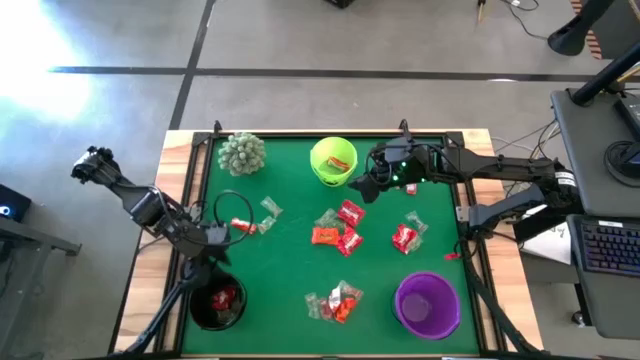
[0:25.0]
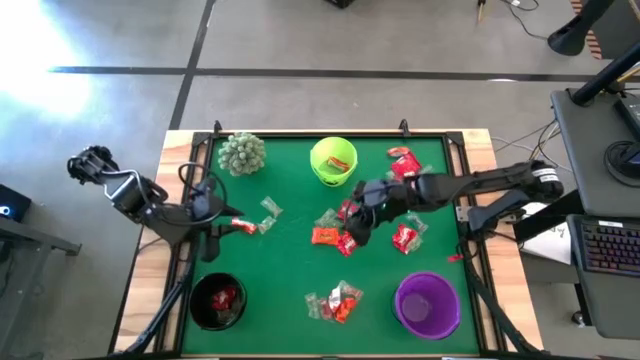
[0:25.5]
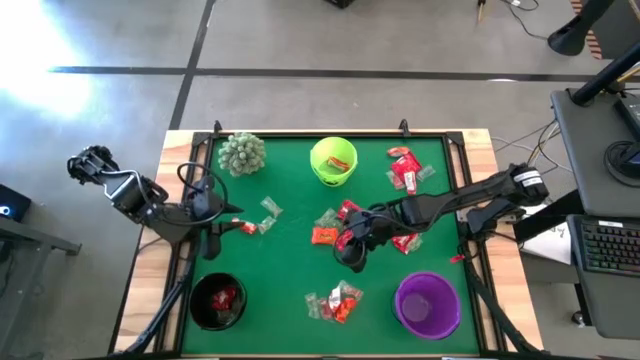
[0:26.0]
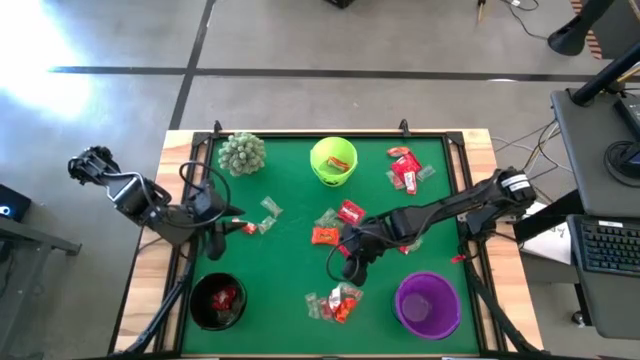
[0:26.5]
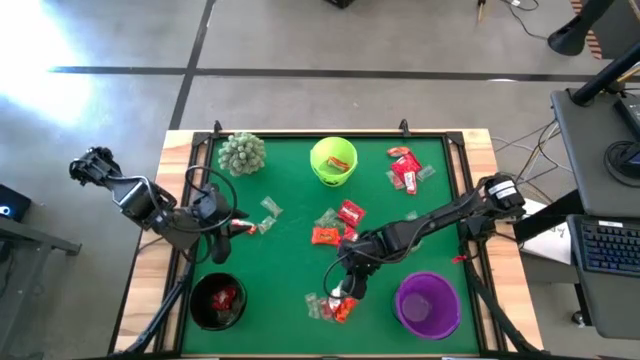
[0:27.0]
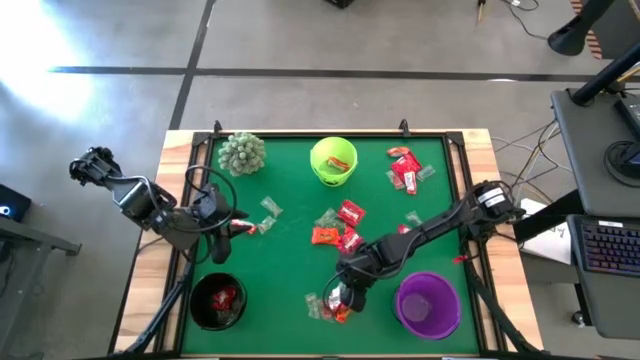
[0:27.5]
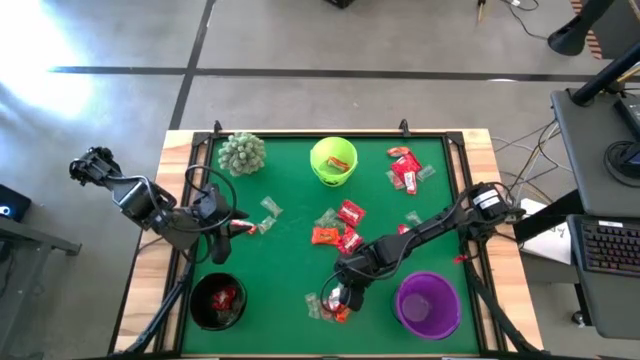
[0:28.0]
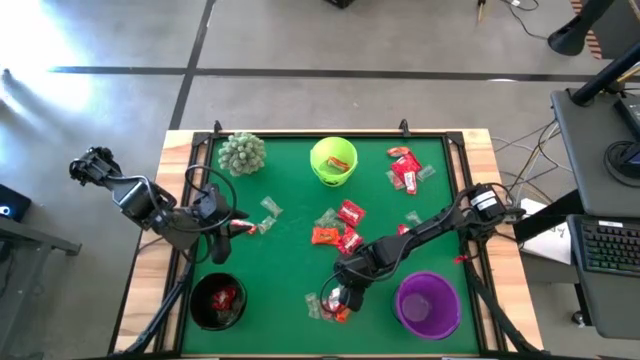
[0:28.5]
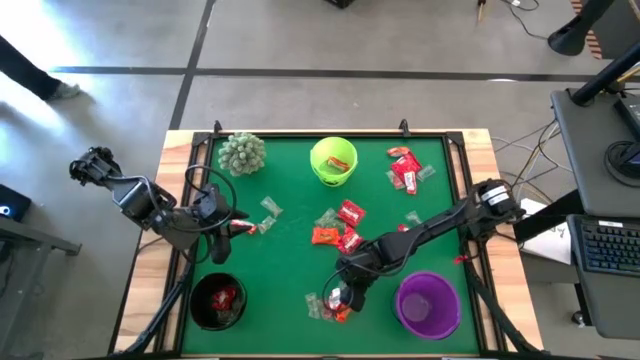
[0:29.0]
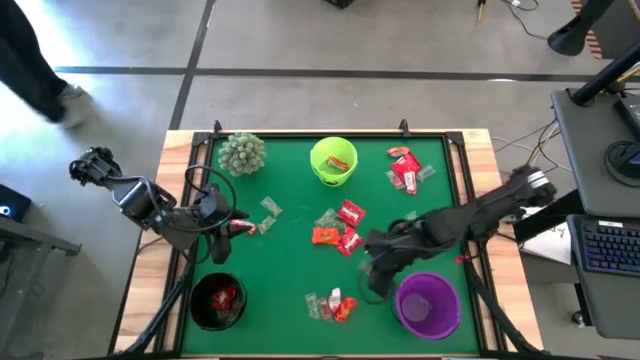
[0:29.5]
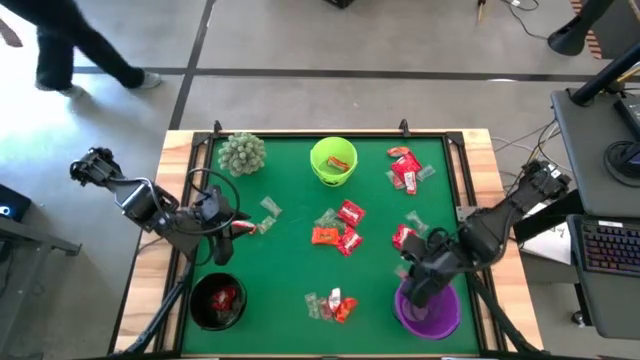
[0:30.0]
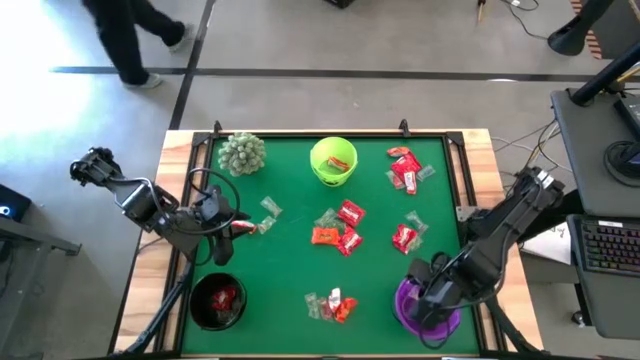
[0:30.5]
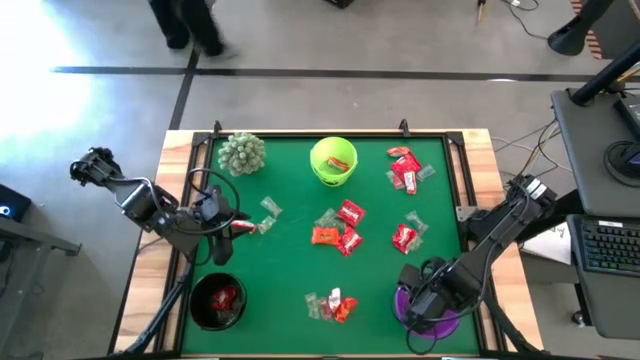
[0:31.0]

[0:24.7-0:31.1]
Task: Organize candy in baskets
Put the orange candy into the violet bucket

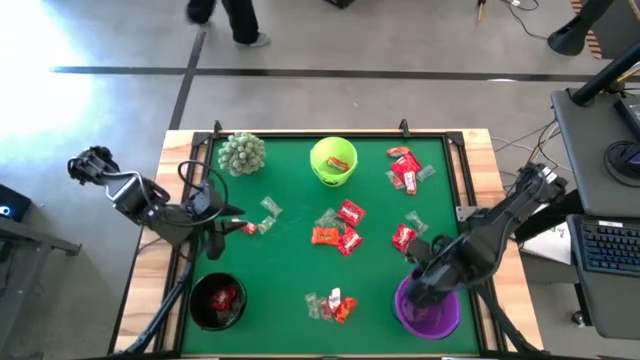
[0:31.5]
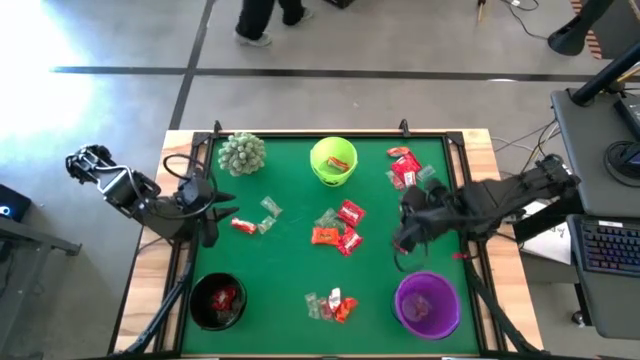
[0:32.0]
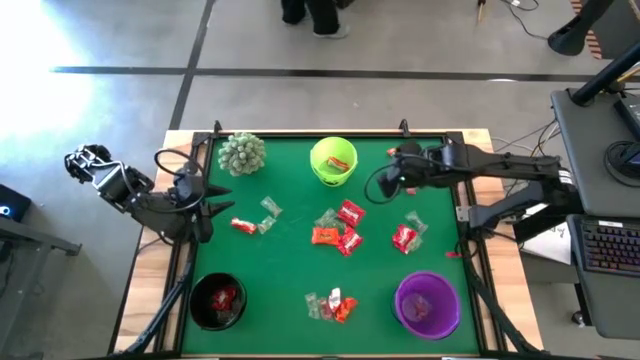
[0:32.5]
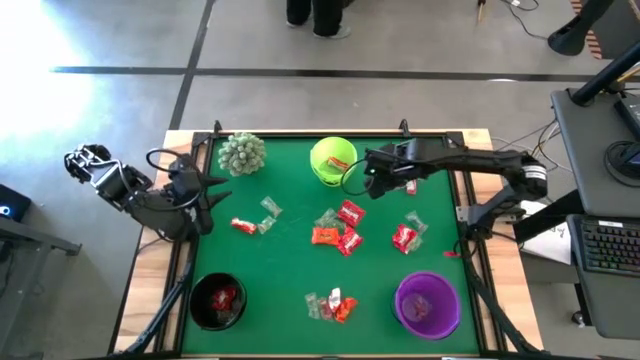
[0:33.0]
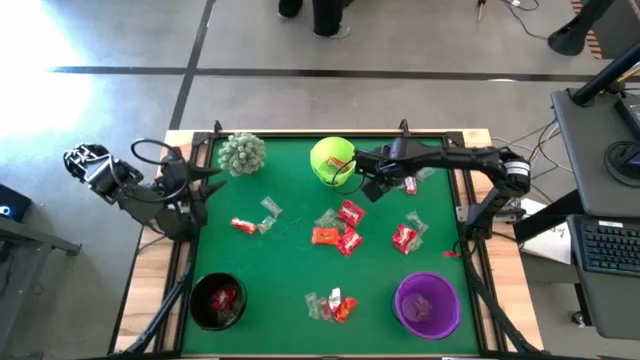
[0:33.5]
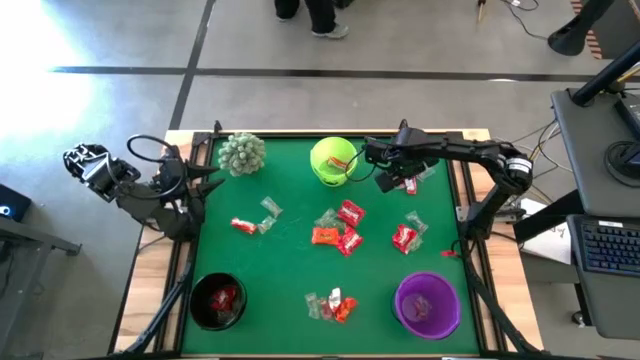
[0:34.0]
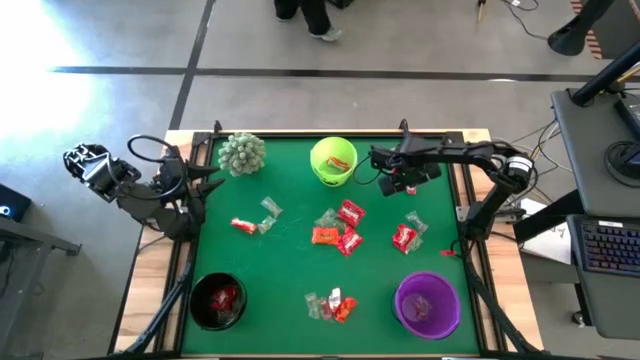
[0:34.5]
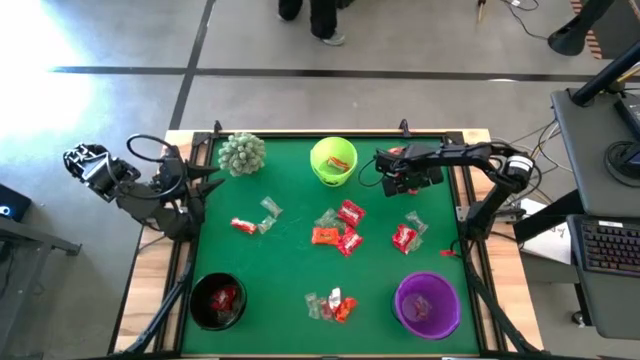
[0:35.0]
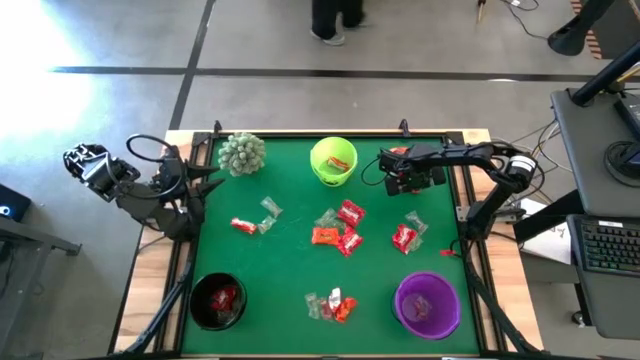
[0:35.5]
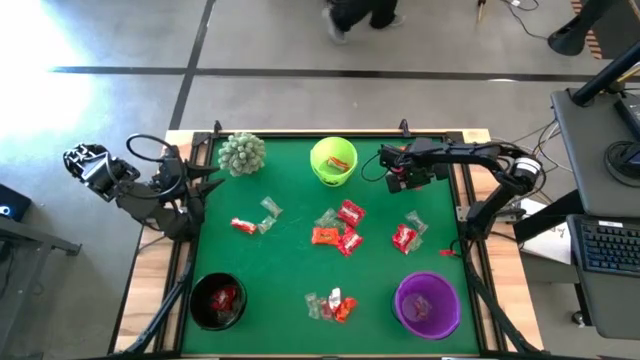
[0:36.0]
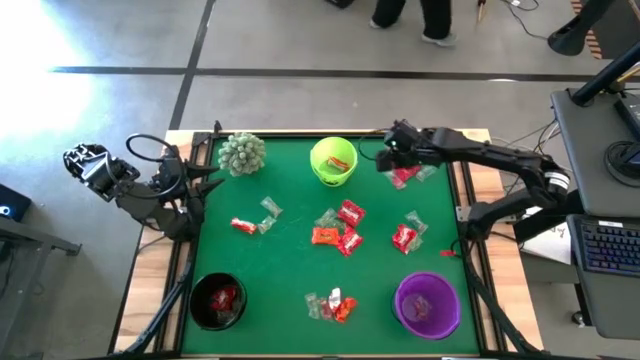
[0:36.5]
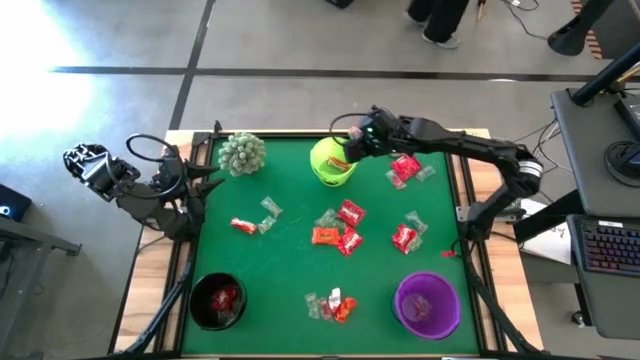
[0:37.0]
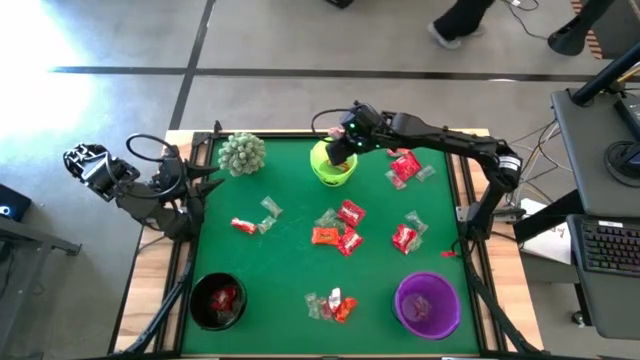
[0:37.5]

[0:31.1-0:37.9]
Put the orange chocolate bar into the green bucket

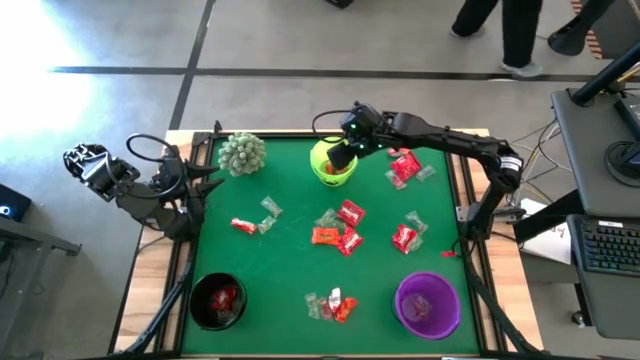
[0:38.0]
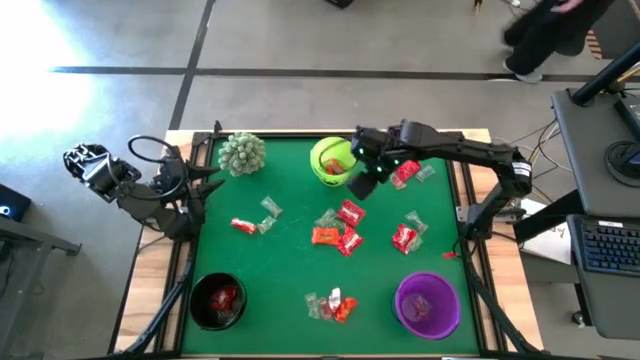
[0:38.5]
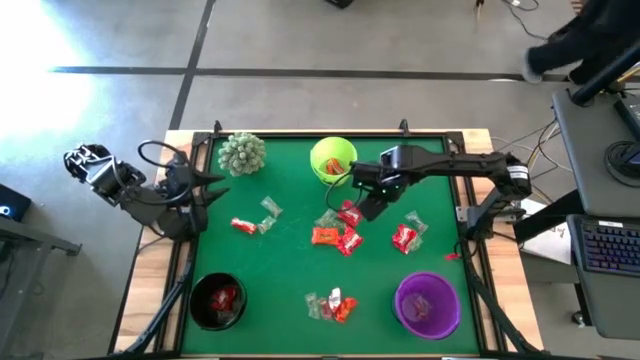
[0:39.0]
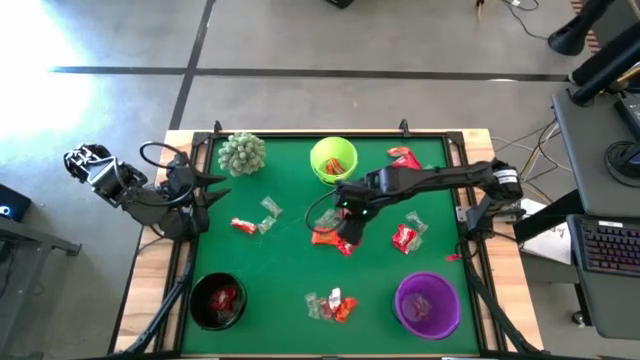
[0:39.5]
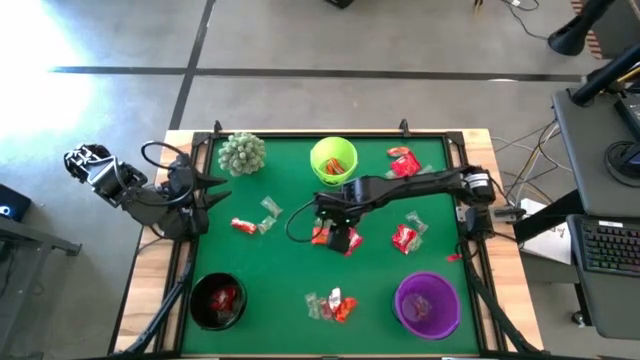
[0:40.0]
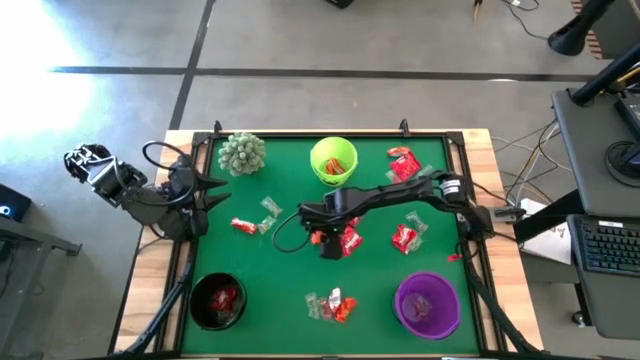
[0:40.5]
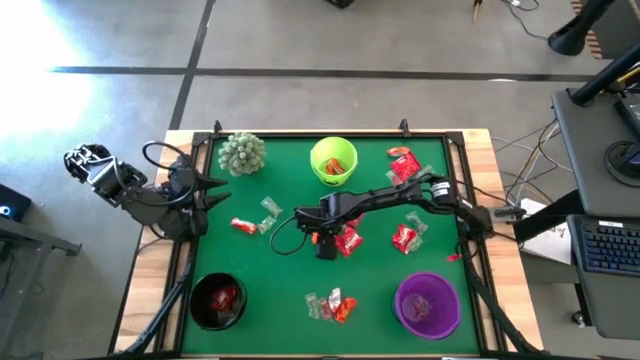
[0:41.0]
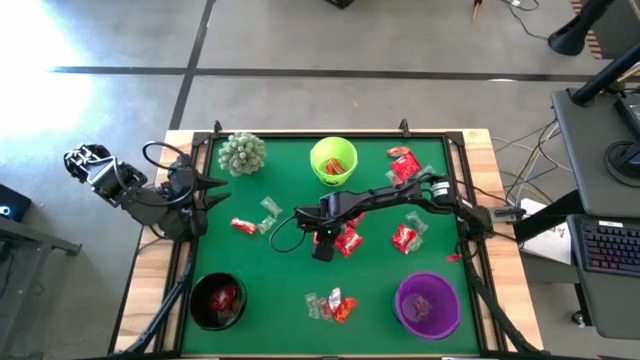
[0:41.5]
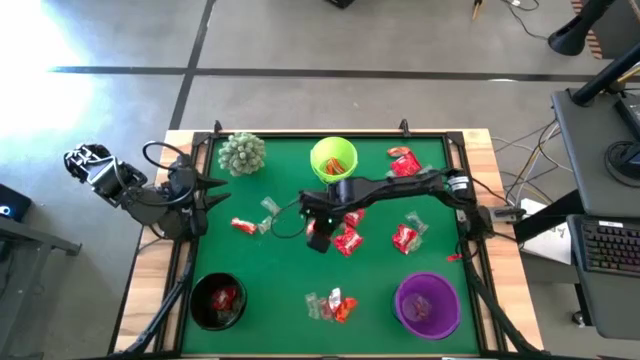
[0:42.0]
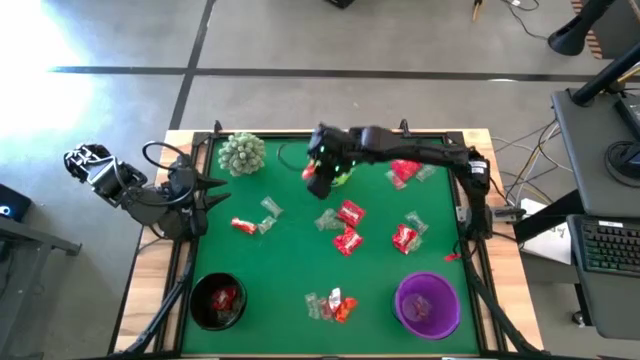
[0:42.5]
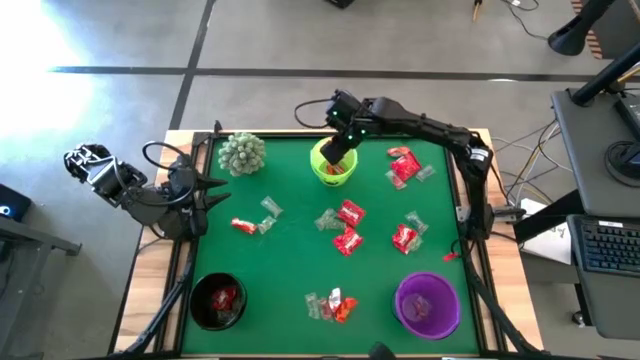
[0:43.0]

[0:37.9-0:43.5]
Put the orange chocolate bar into the green bucket

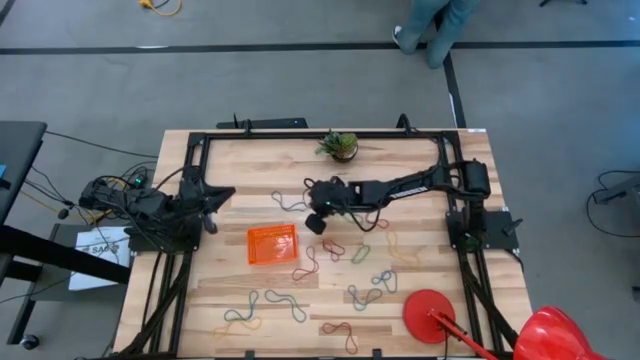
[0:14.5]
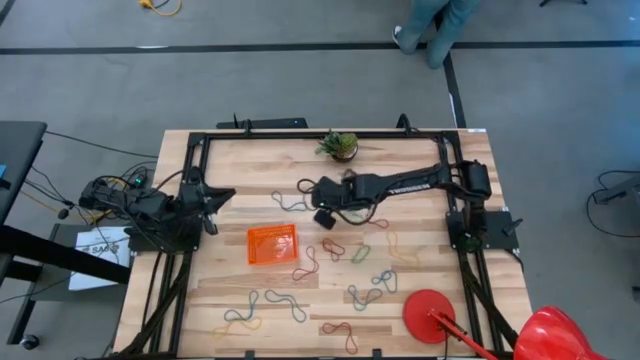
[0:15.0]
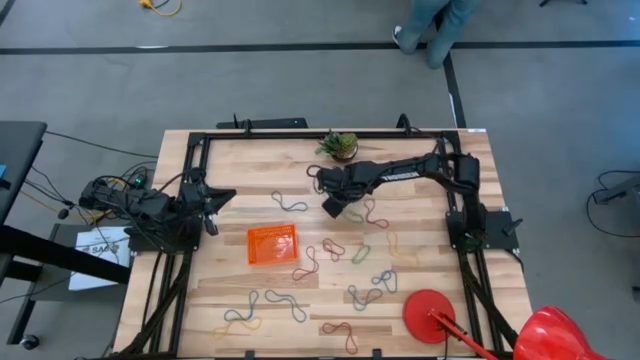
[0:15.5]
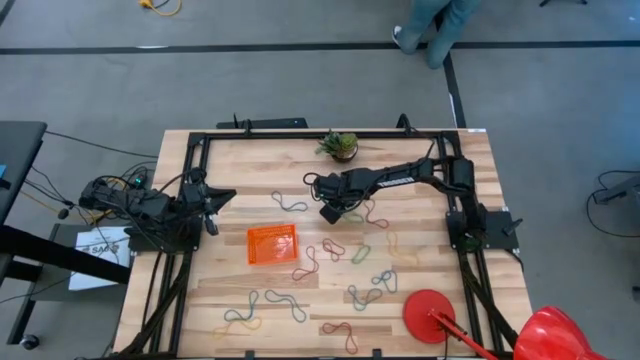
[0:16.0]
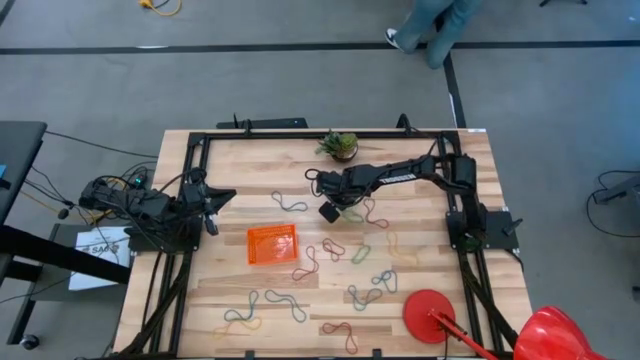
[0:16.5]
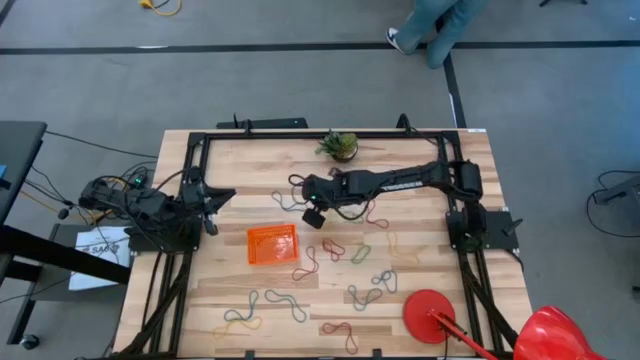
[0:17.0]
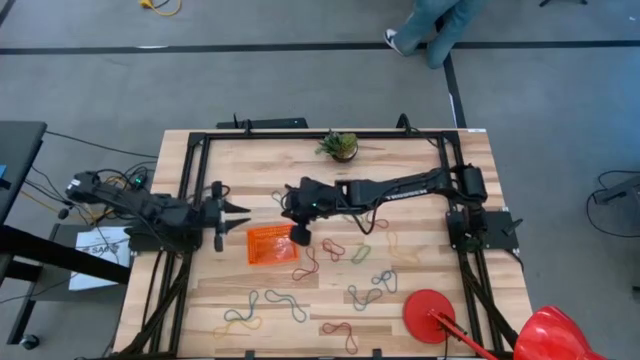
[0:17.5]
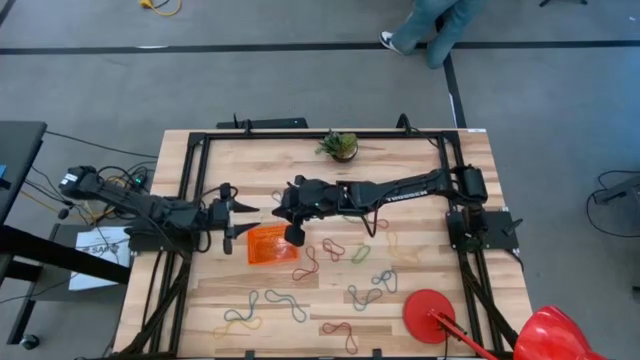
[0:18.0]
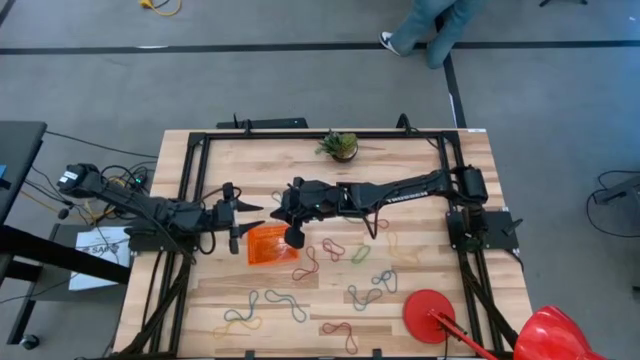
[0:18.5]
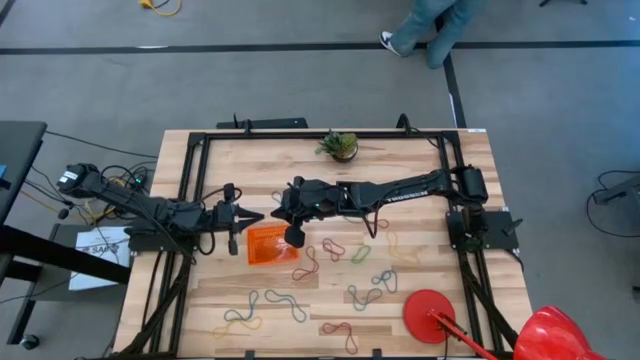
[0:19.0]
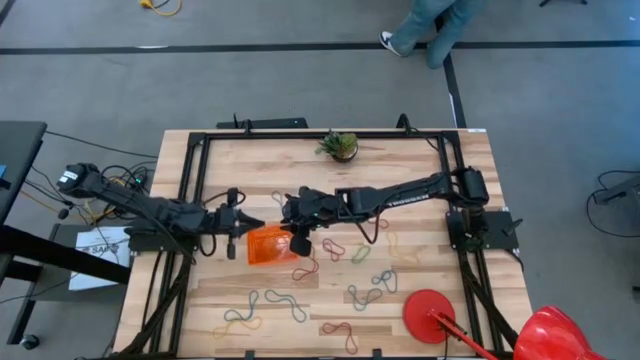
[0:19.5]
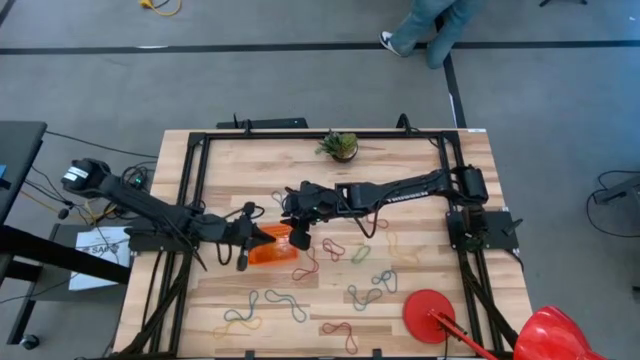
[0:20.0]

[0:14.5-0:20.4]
Task: Pick and place rubber bands into bin
Put the top yellow rubber band into the orange container
